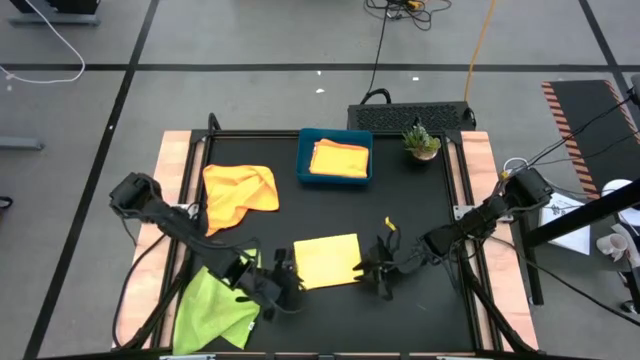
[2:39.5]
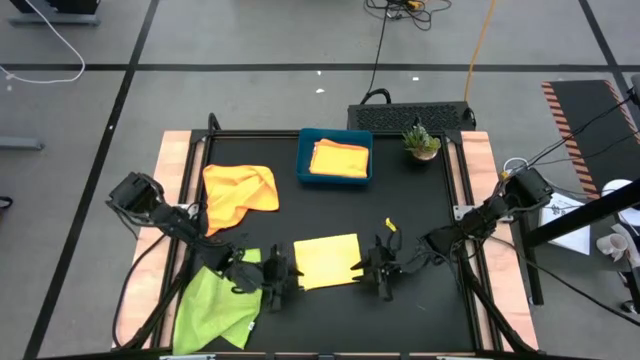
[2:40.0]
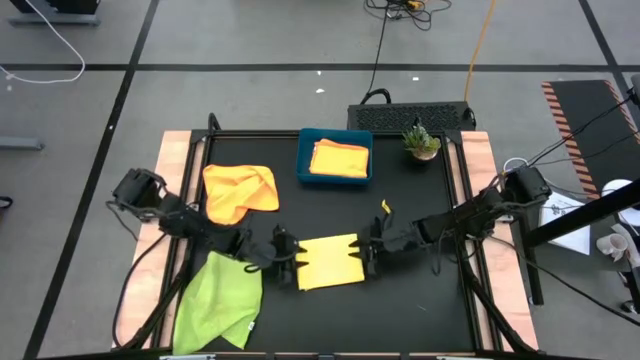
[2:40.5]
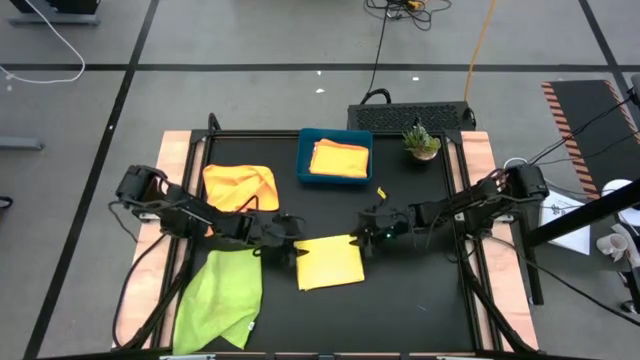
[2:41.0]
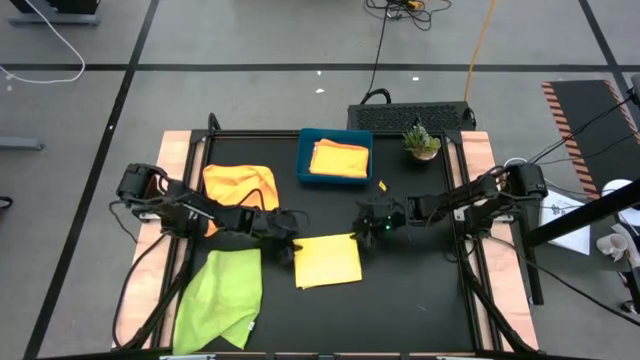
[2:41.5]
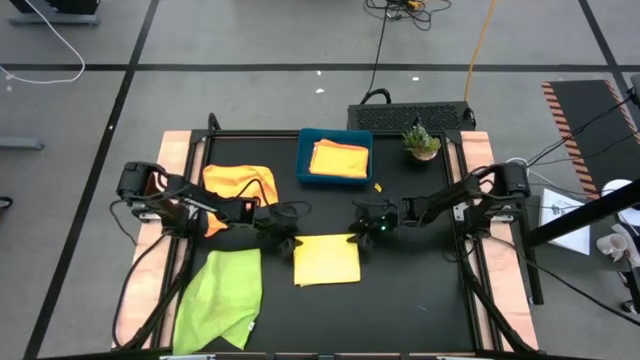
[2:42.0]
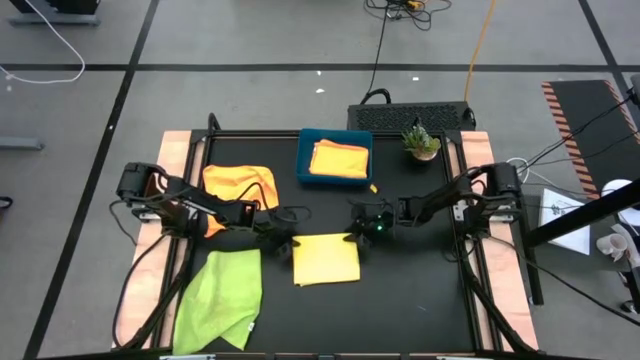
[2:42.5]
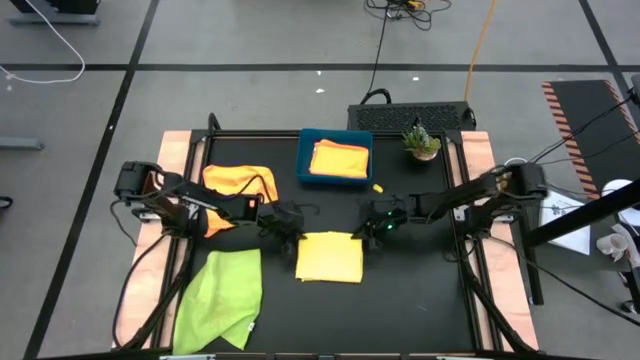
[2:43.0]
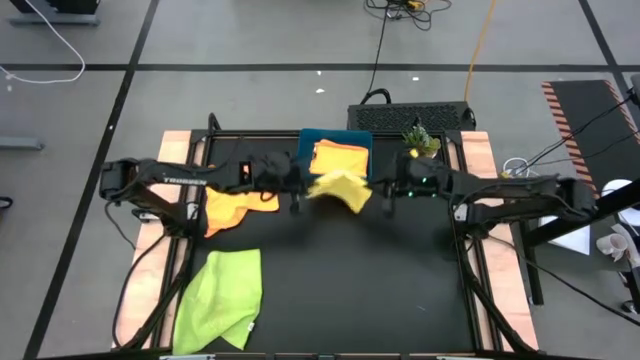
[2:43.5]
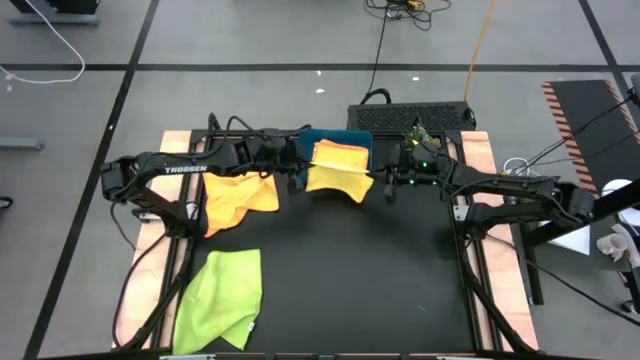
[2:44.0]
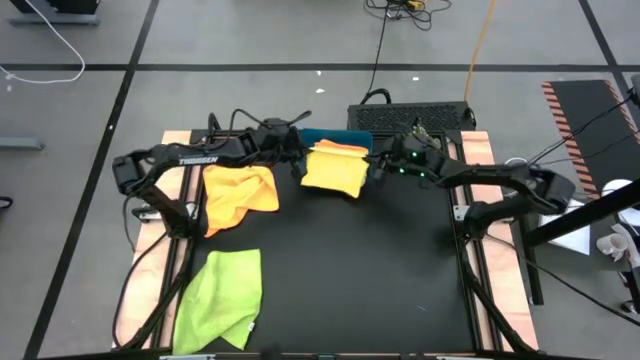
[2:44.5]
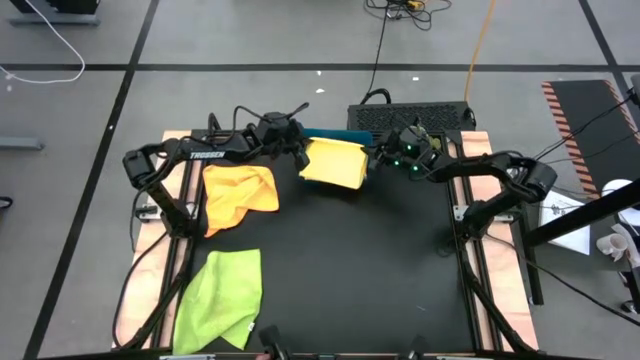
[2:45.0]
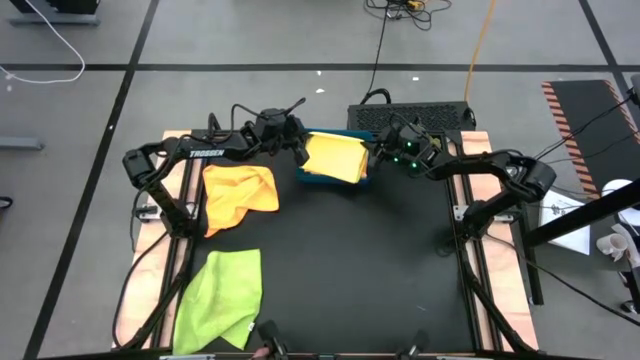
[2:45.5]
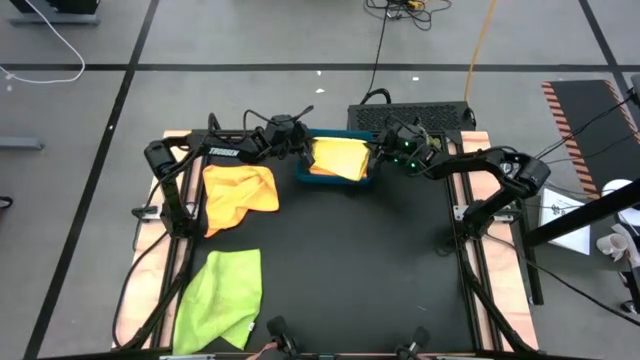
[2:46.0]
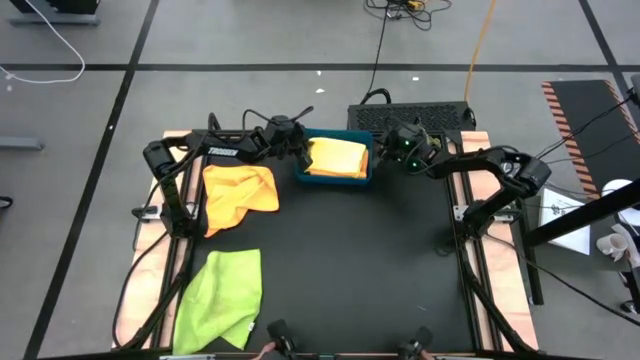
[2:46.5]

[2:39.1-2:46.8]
Task: Fold microfiber towels
Put the yellow microfiber cloth into the dark blue bin

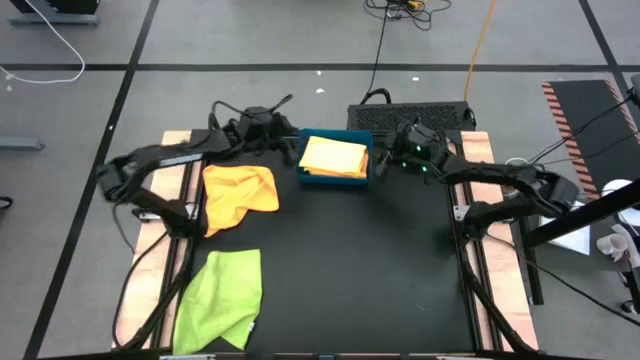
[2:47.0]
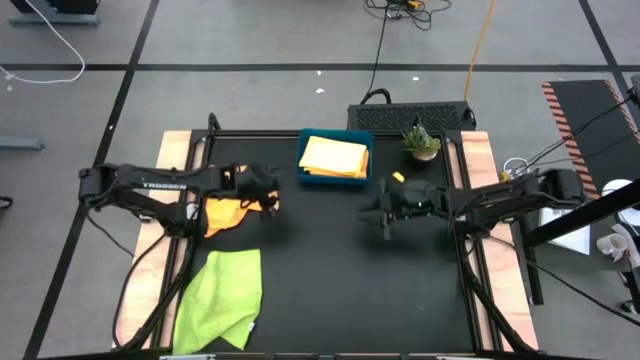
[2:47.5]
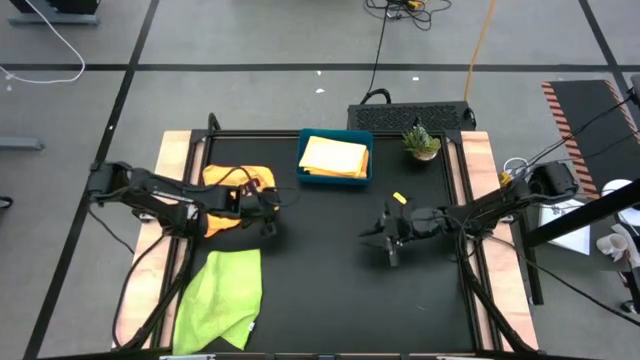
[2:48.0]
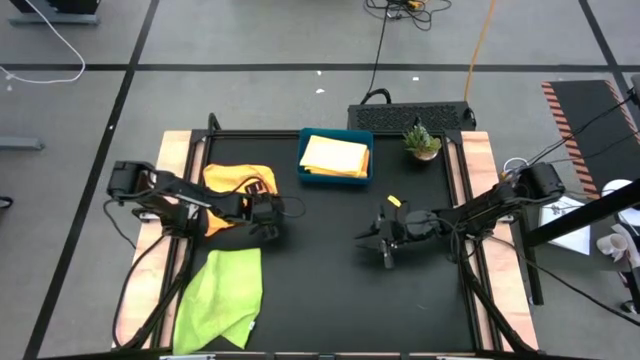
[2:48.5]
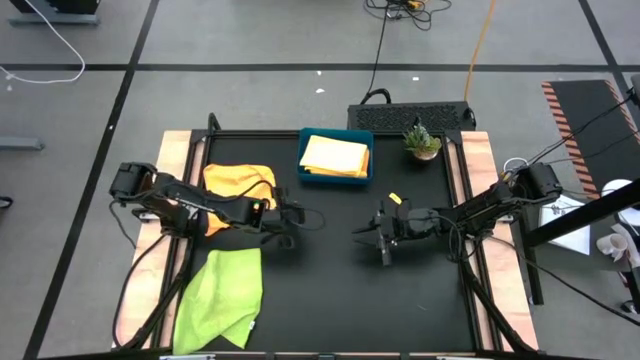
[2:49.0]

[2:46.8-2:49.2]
Fold the orange microfiber cloth

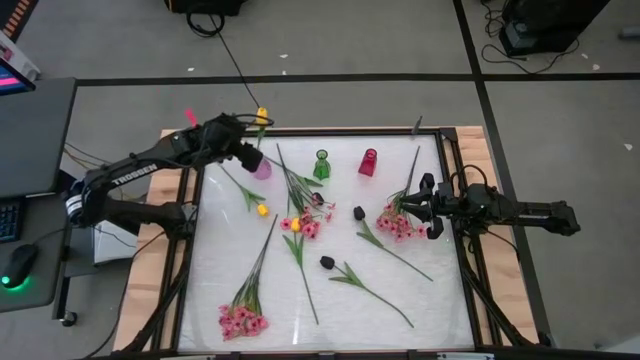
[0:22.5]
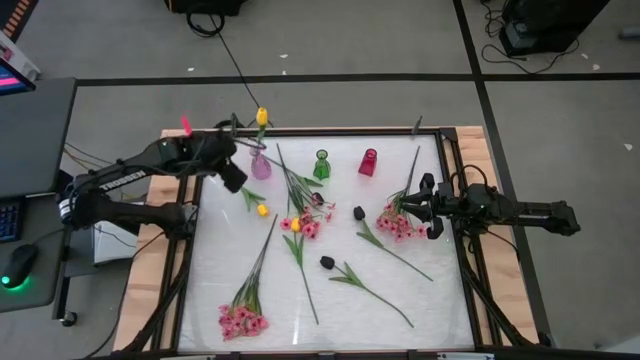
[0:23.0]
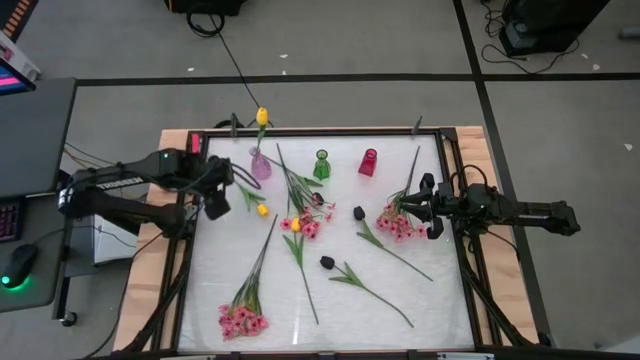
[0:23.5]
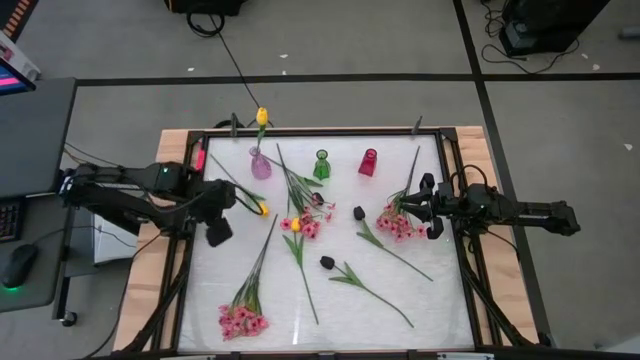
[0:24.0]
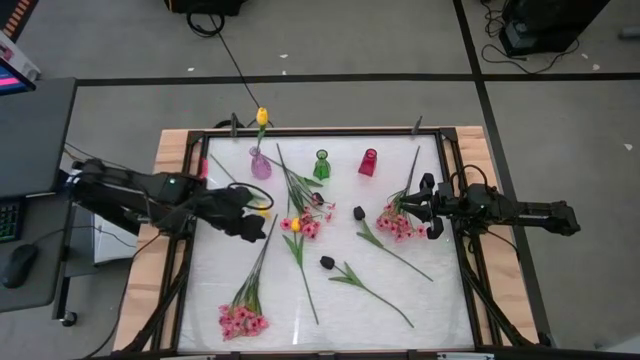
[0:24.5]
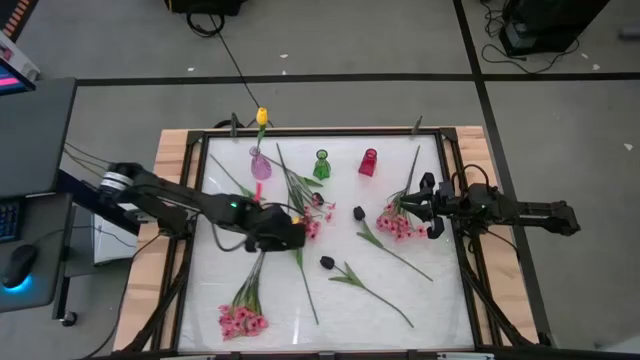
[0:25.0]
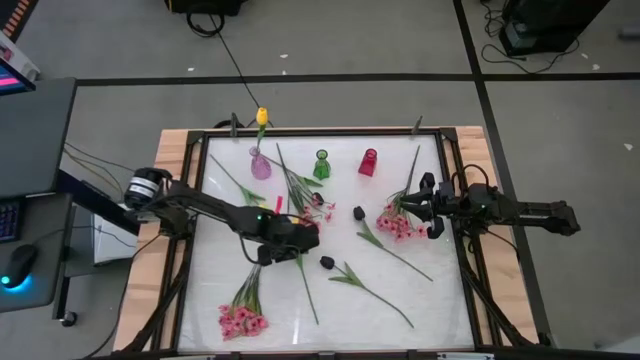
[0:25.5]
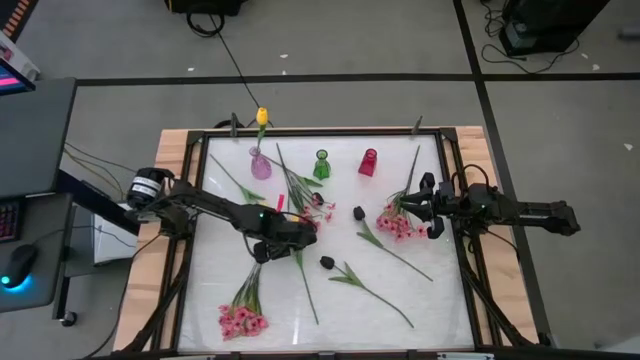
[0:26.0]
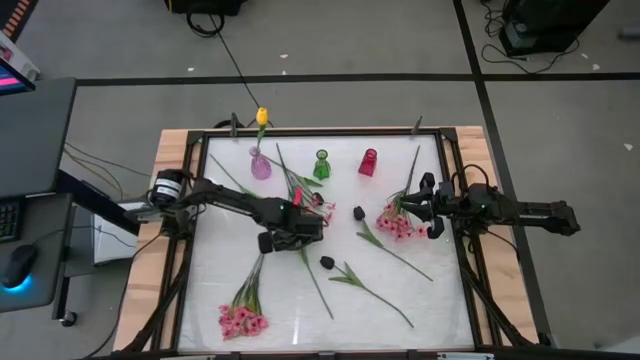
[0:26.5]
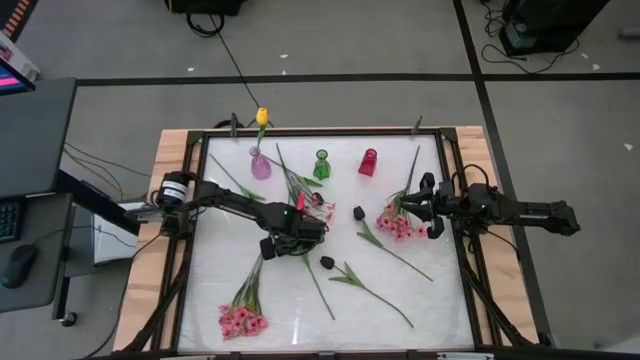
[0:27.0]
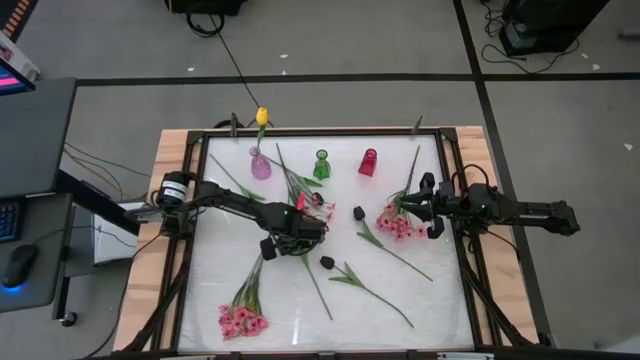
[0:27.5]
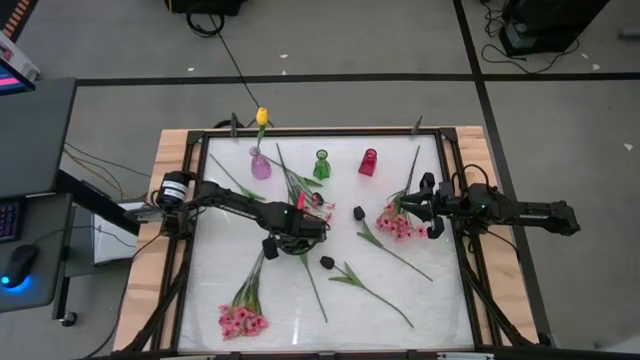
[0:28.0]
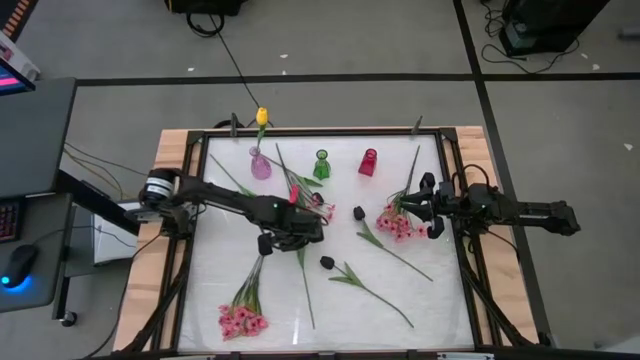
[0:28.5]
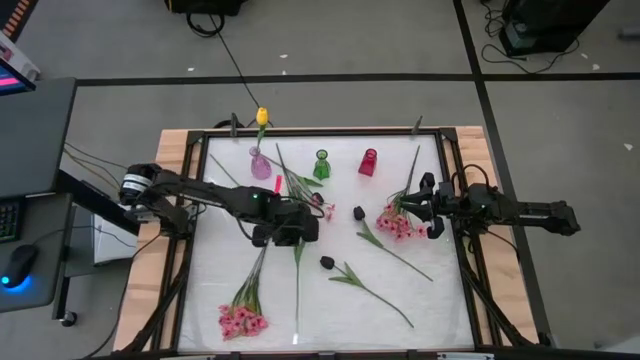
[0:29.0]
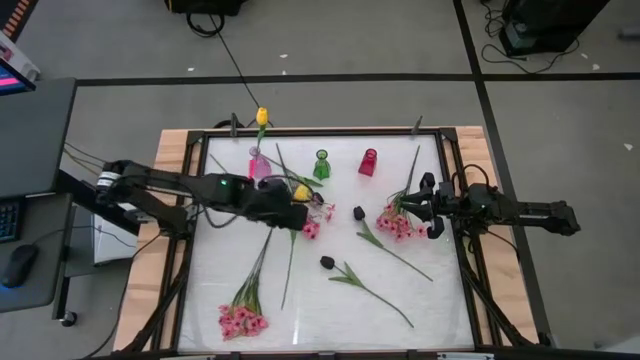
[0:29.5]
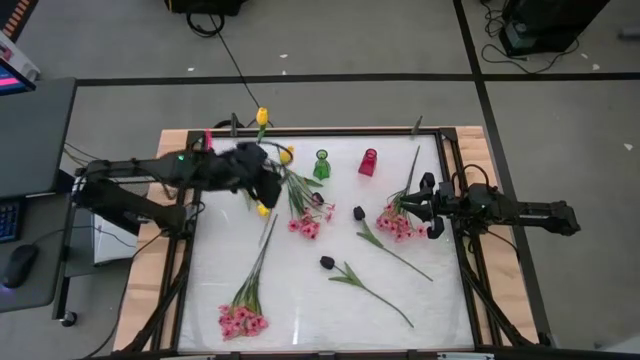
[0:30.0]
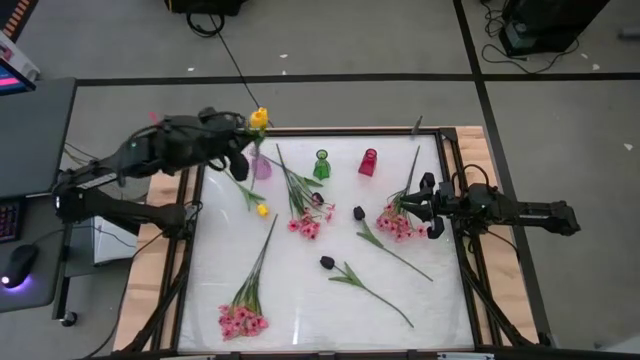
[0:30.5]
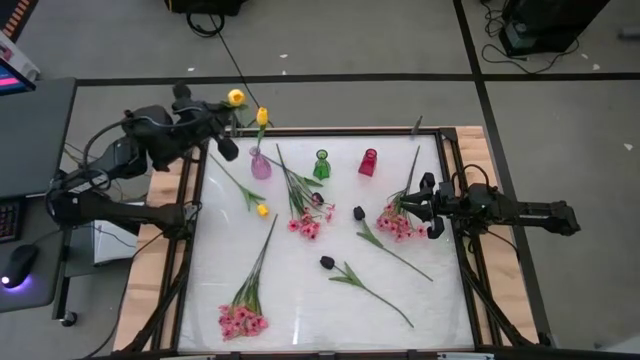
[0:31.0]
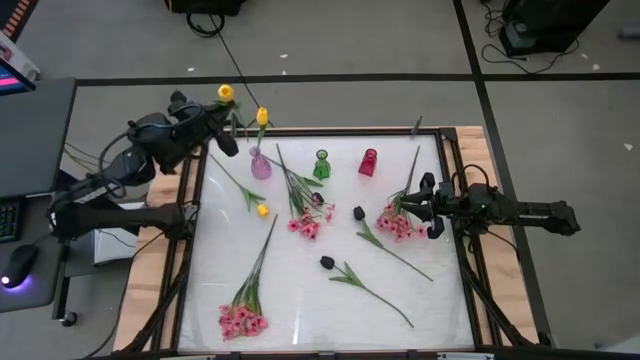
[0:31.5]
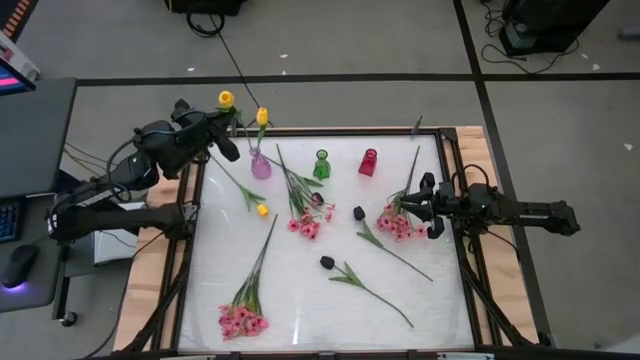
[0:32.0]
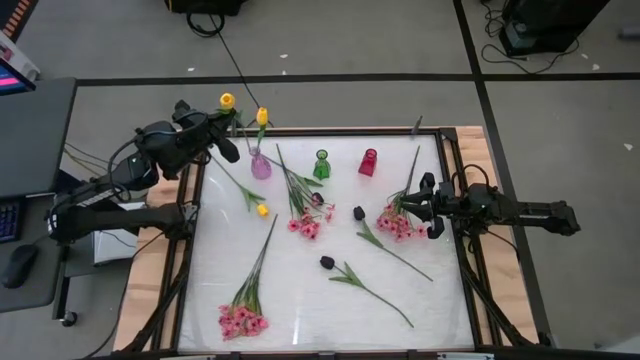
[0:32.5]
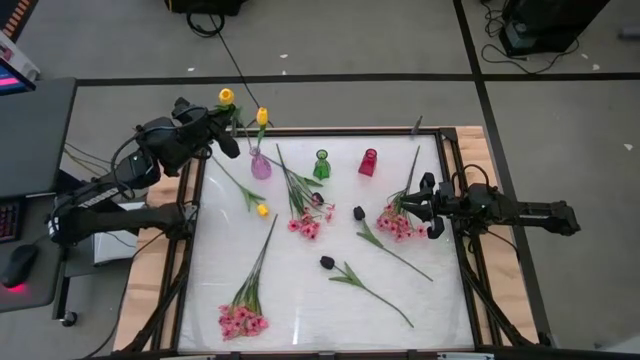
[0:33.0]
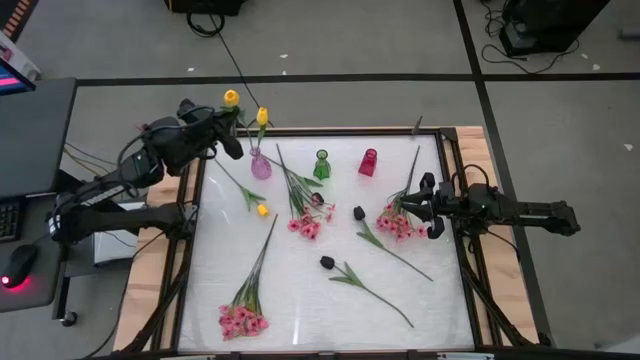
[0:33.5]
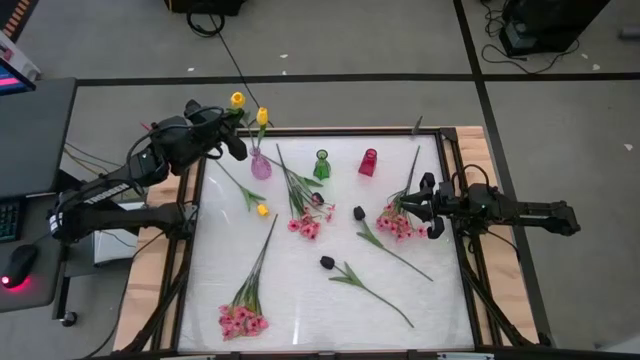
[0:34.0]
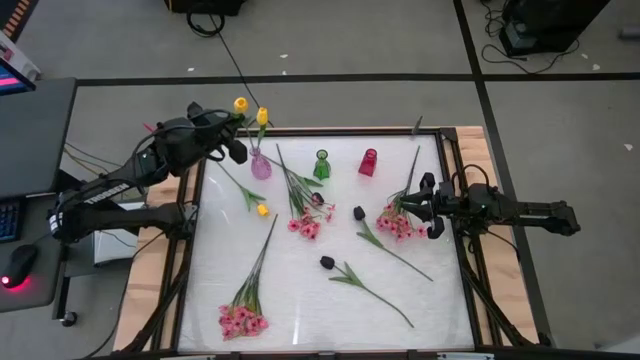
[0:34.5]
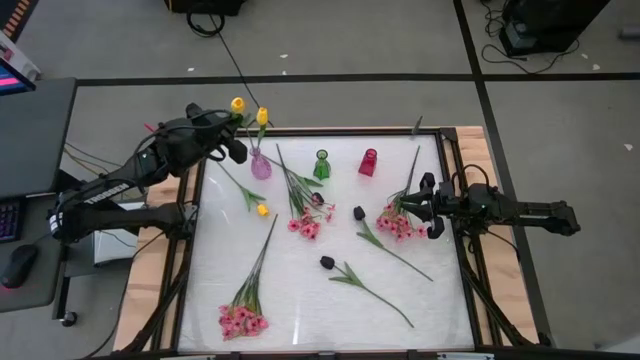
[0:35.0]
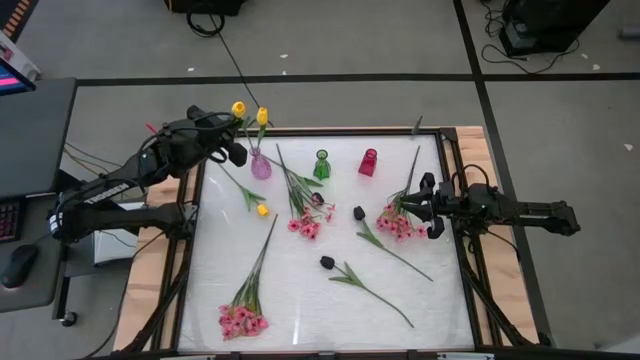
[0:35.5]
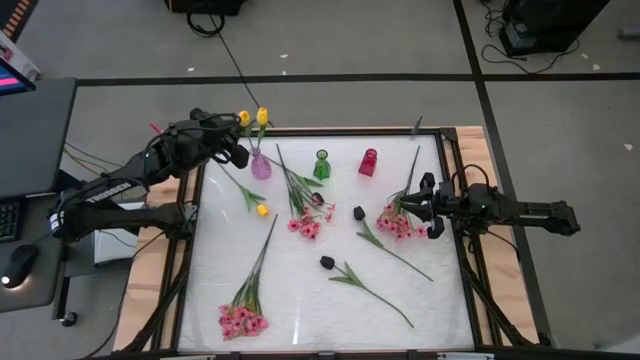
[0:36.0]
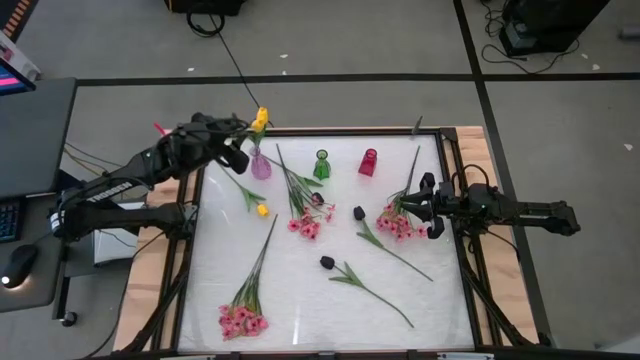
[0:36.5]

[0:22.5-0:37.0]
Task: Sort flowers into vase by color
Put the bottom yellow flower into the purple vase
